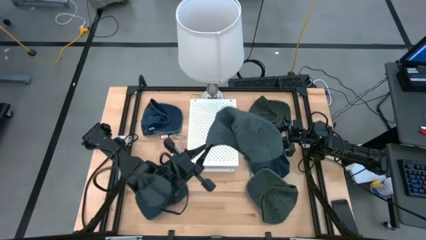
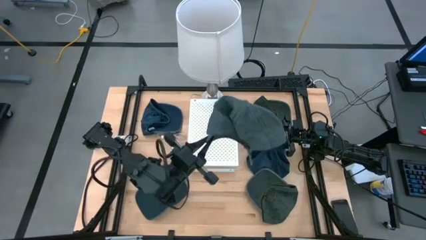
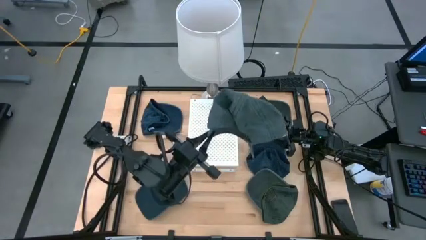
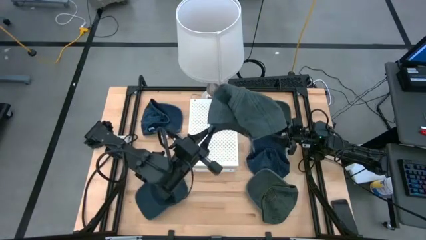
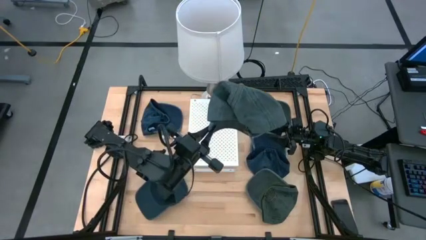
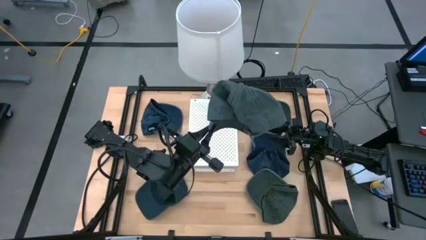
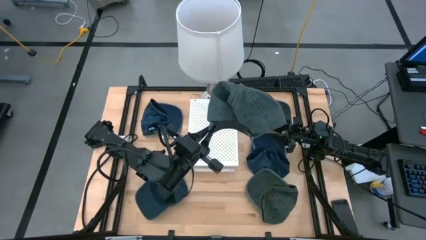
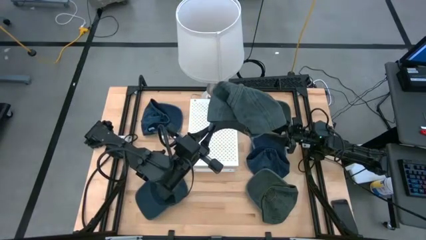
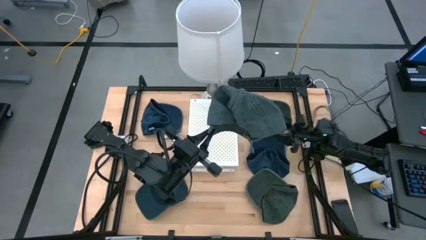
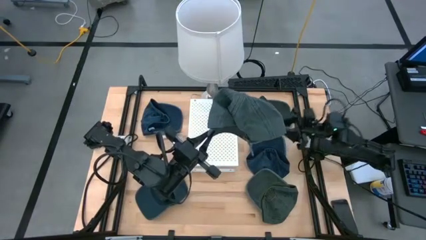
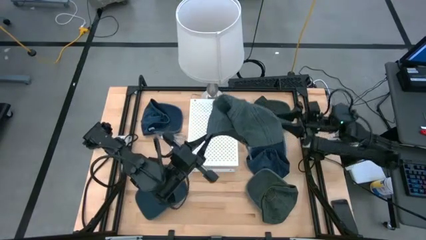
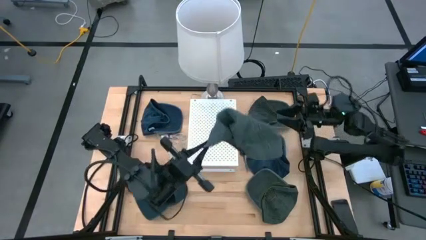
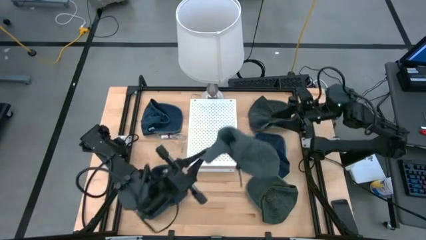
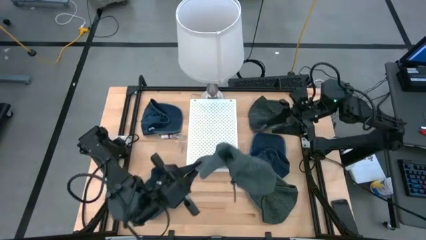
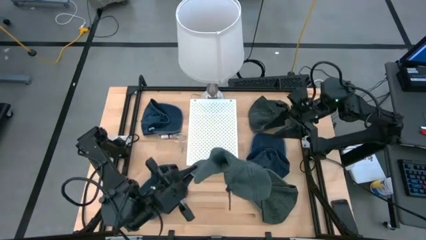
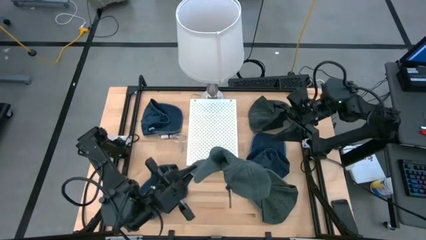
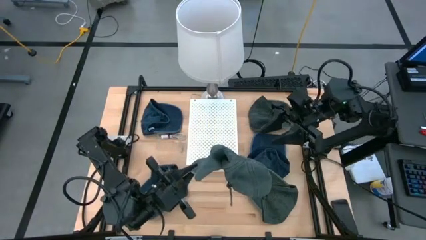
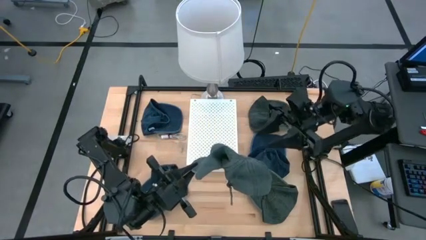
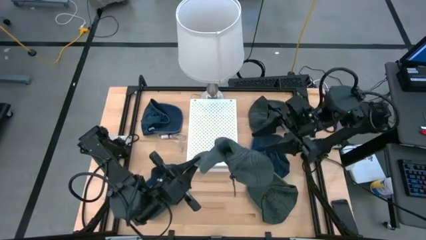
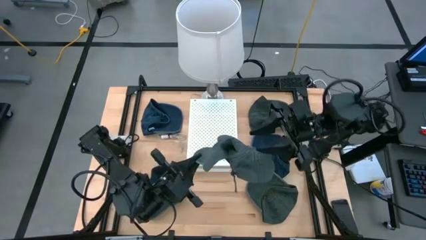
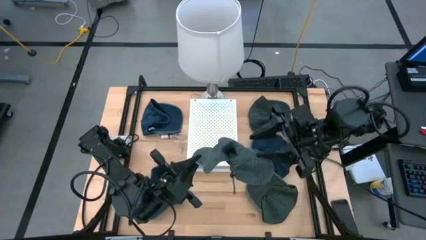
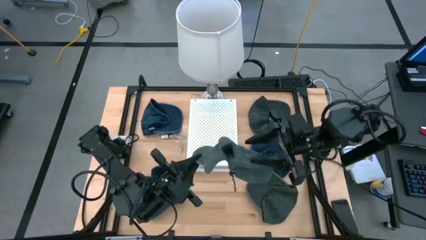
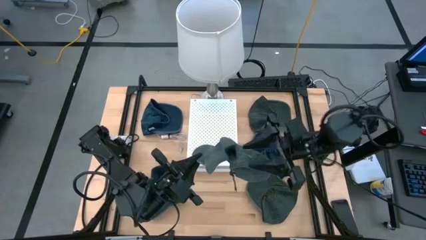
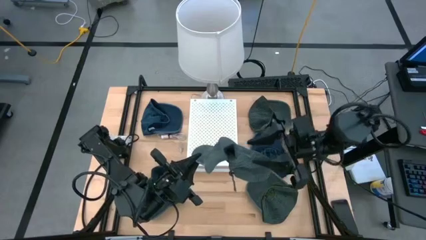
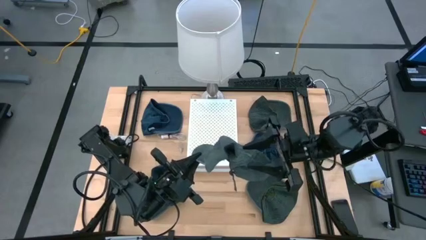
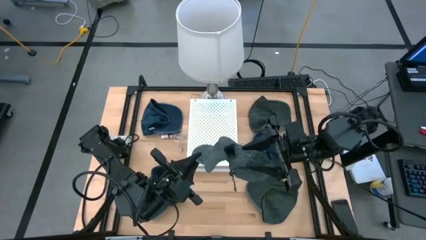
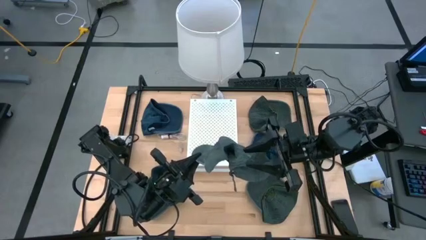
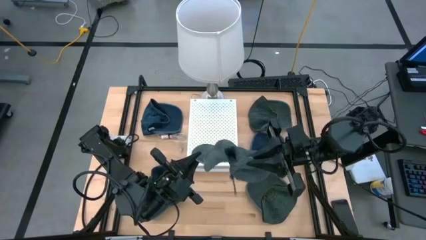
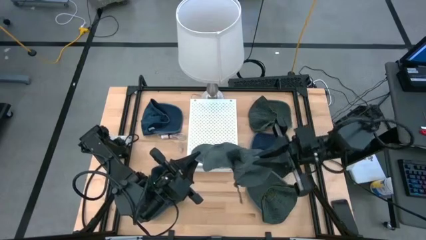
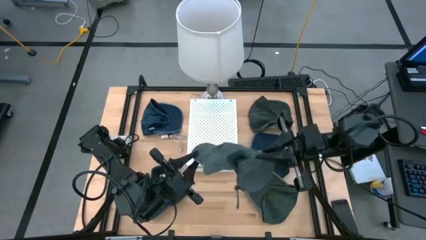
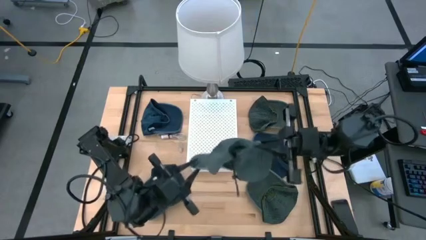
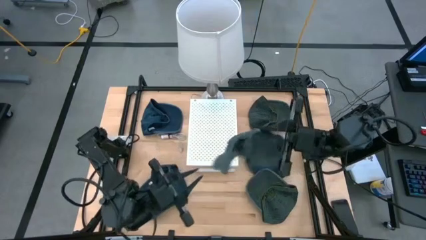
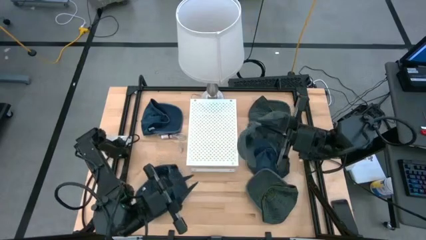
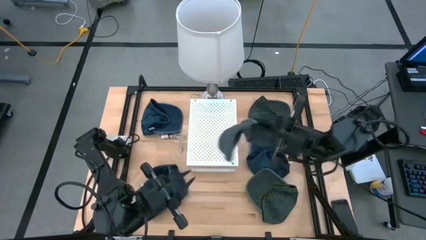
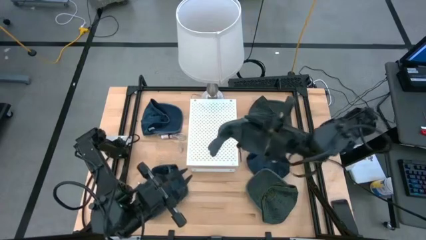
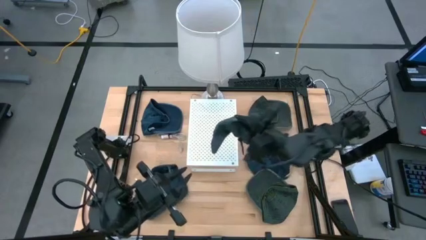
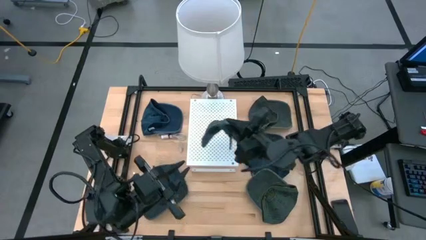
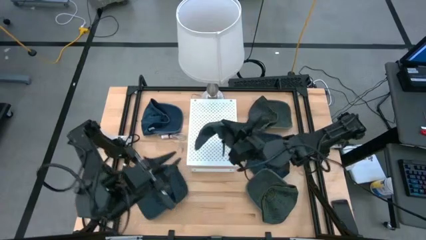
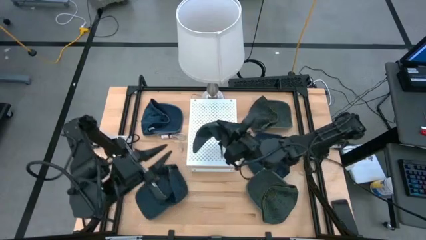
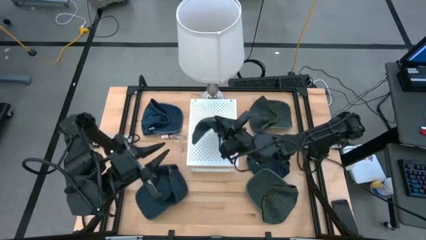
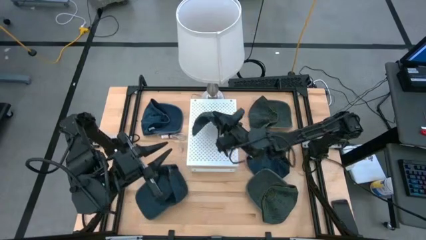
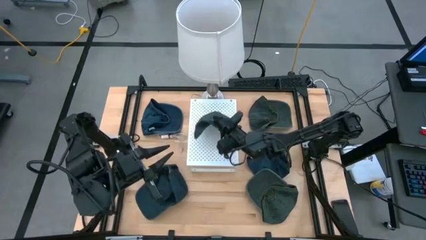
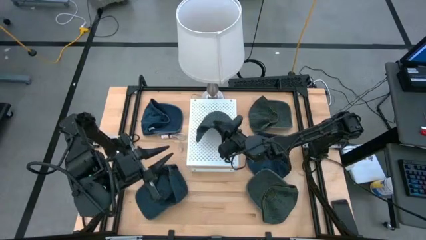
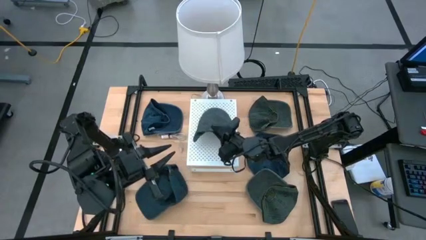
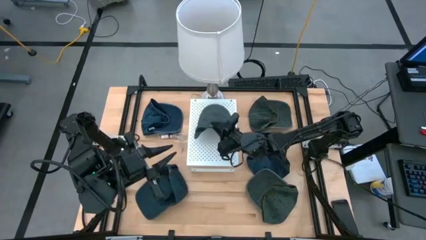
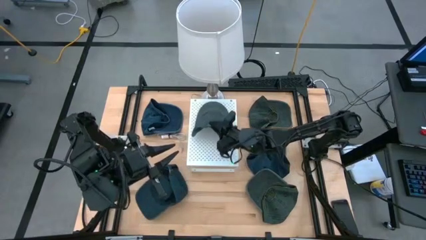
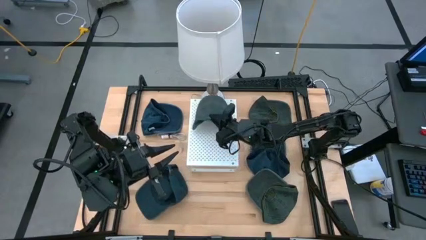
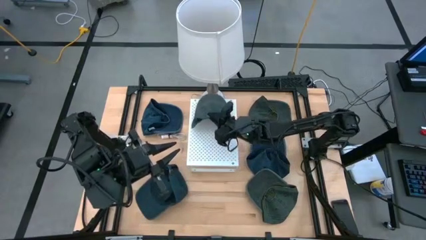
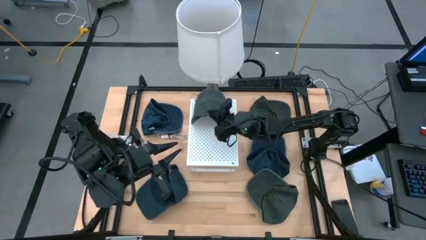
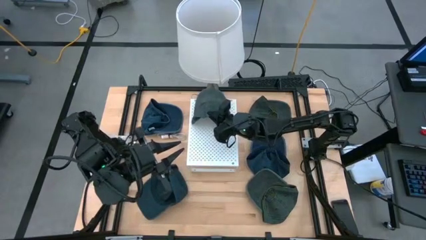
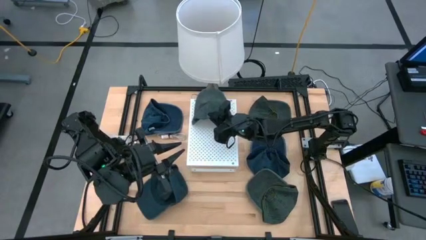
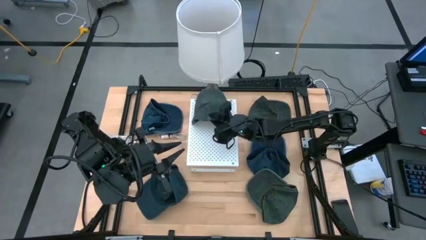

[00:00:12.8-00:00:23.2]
Task: Pick & Place hat
Put the top left gray cap on the shelf

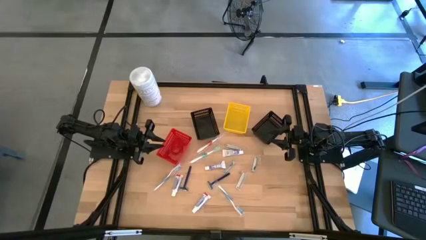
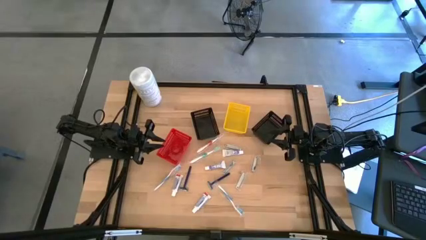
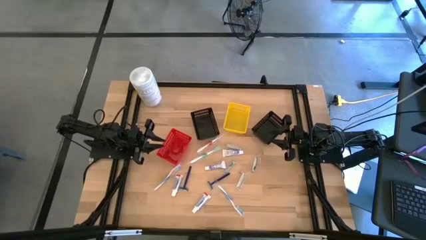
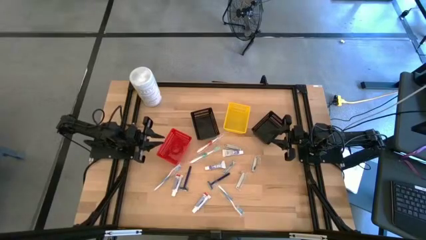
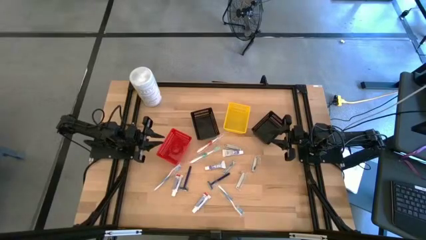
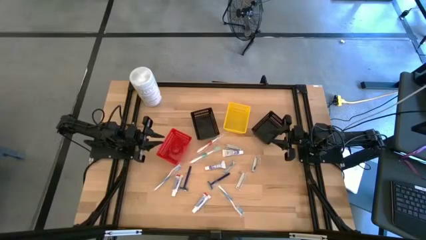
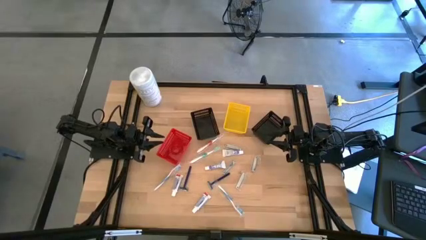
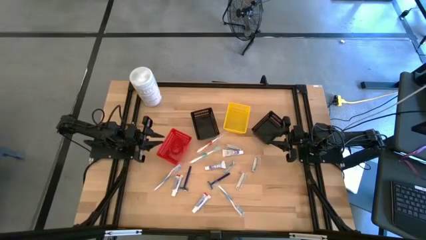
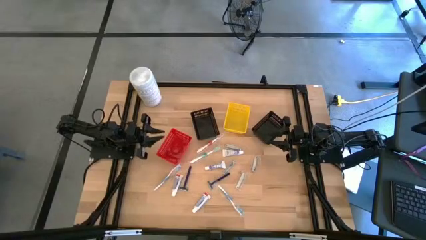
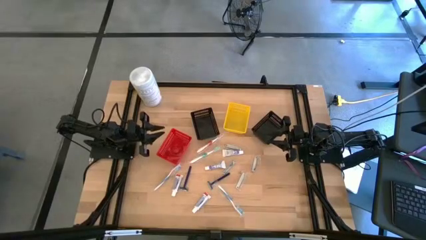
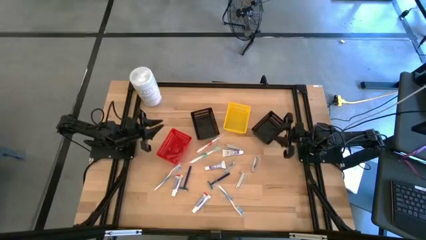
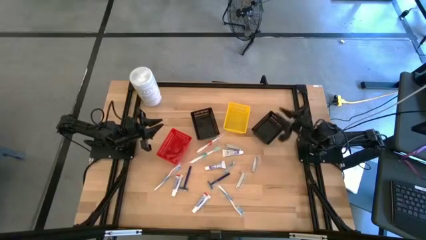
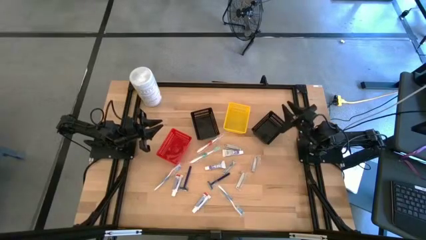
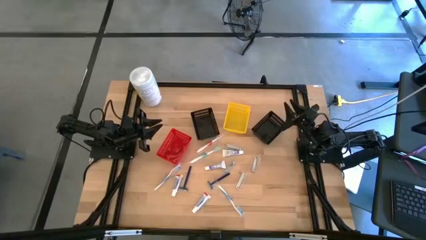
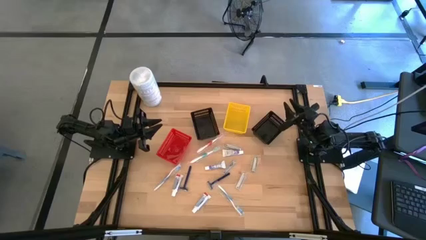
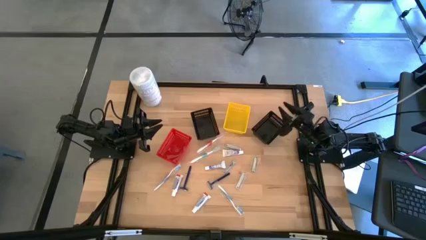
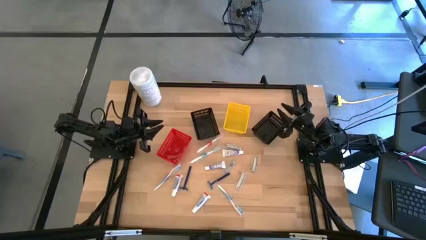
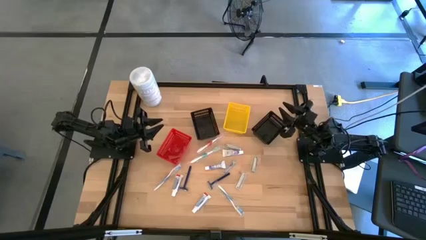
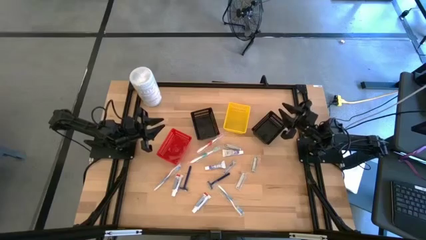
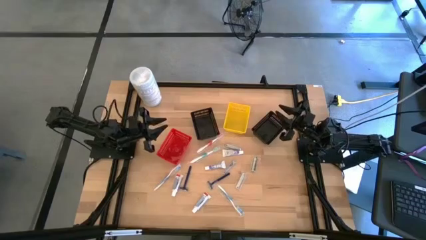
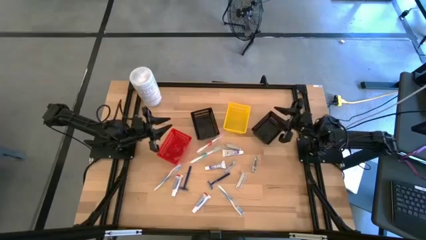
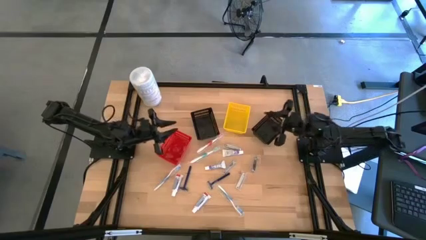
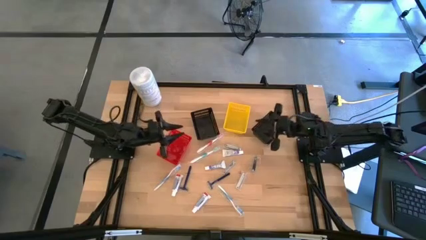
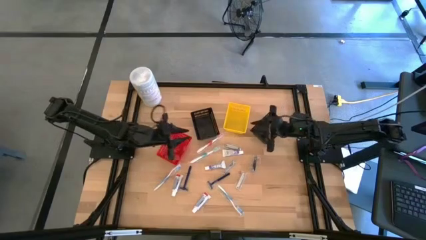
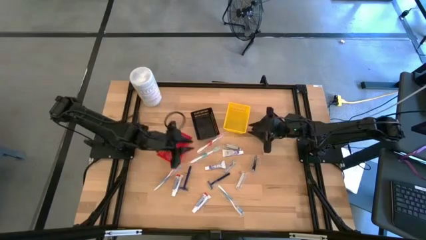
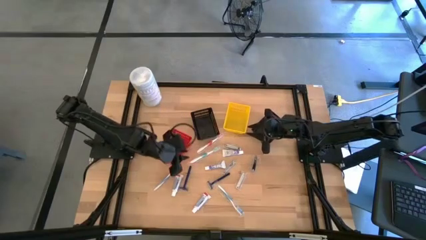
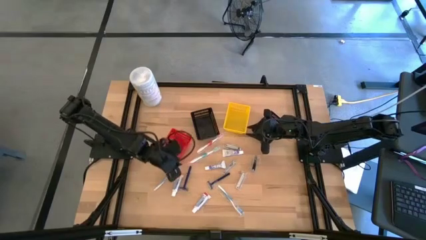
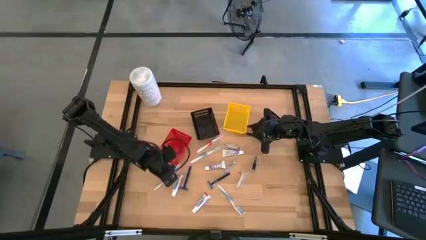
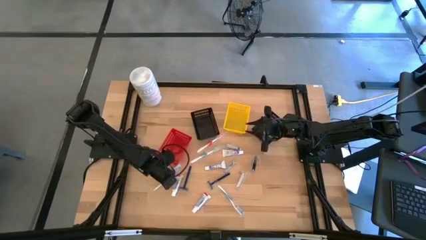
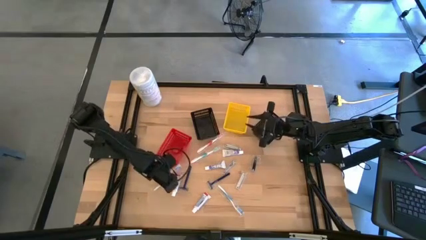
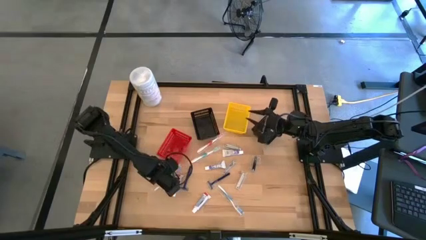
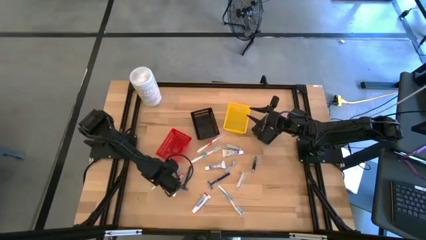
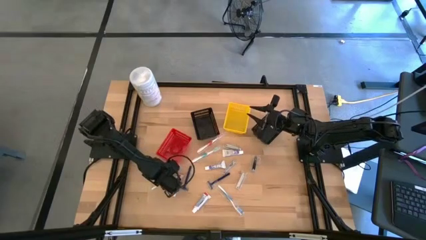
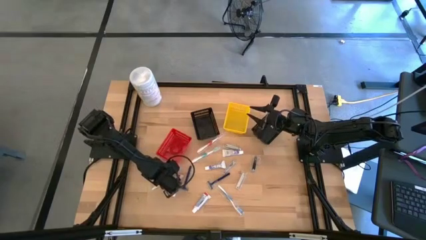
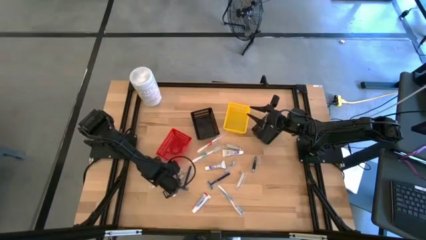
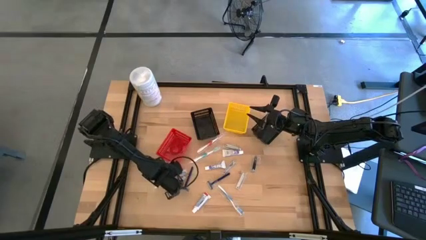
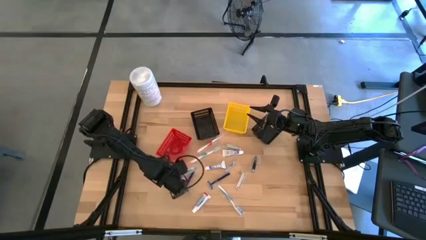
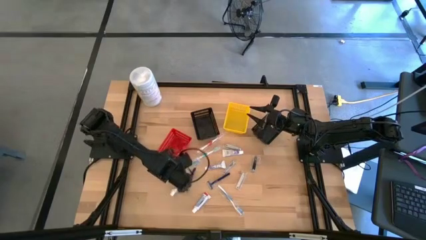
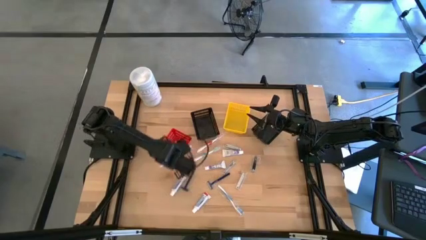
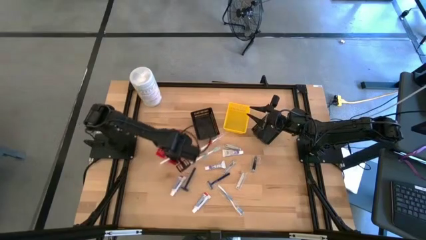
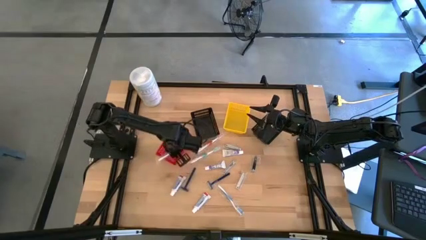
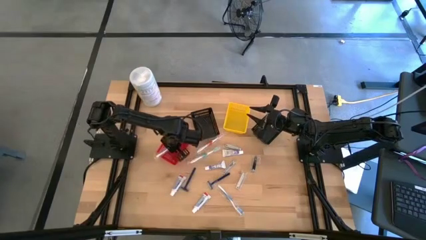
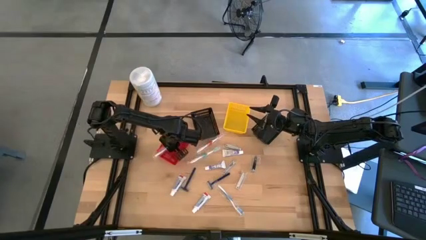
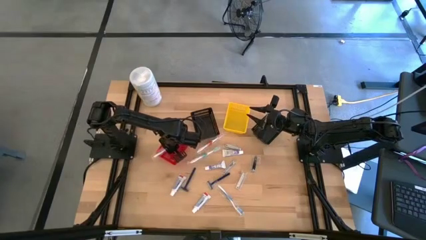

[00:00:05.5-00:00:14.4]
Task: Pick & Place Travel size toiletries
Put the blue toothbrush into the red bin
